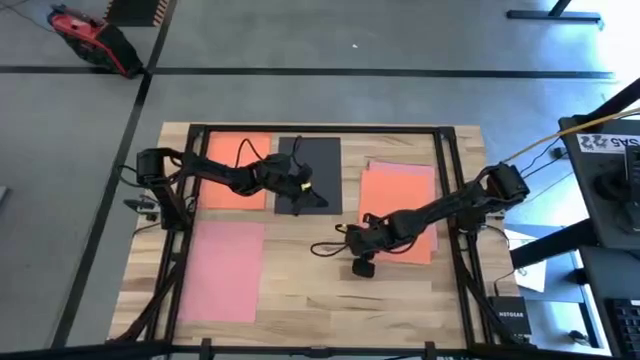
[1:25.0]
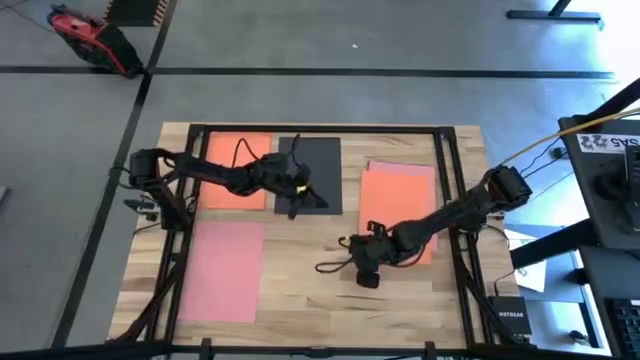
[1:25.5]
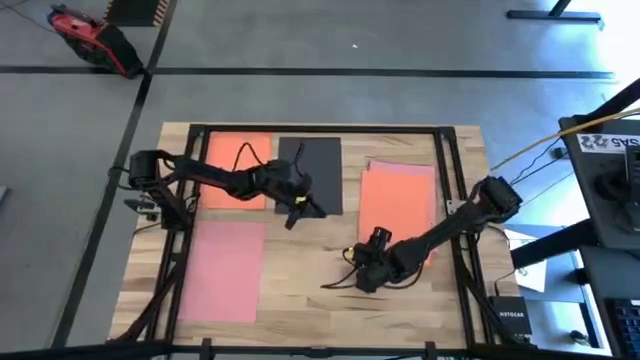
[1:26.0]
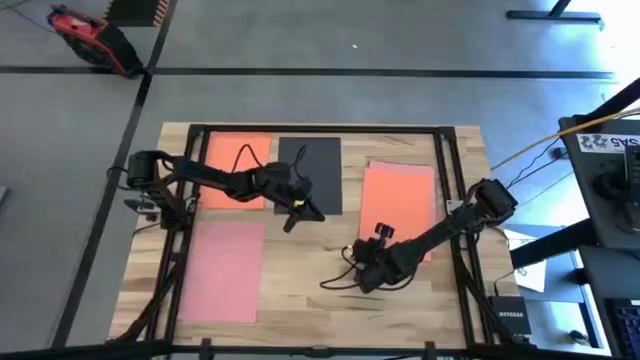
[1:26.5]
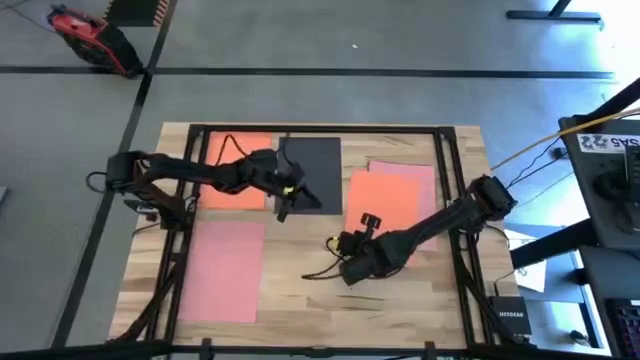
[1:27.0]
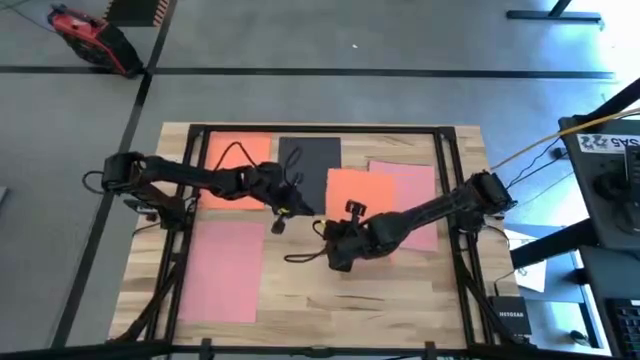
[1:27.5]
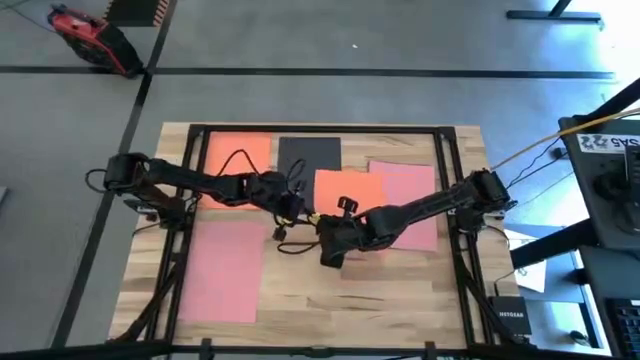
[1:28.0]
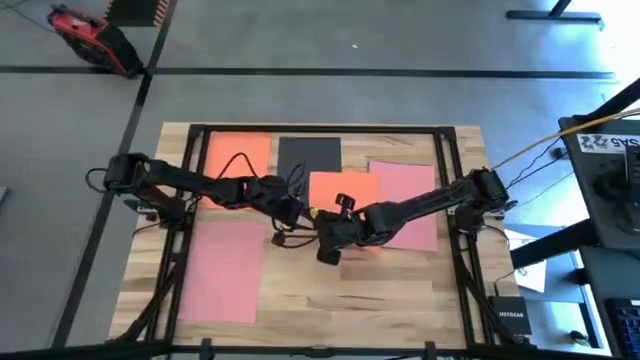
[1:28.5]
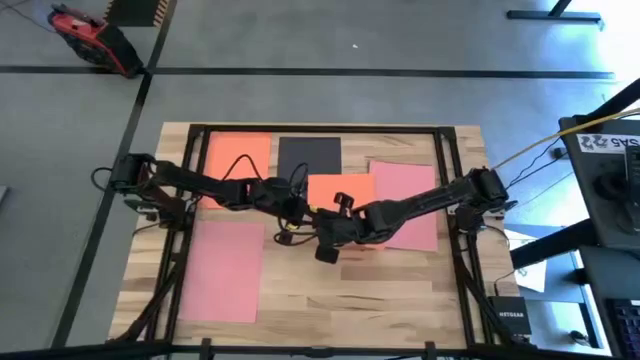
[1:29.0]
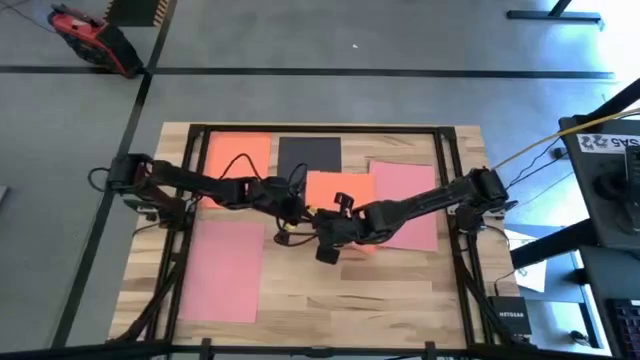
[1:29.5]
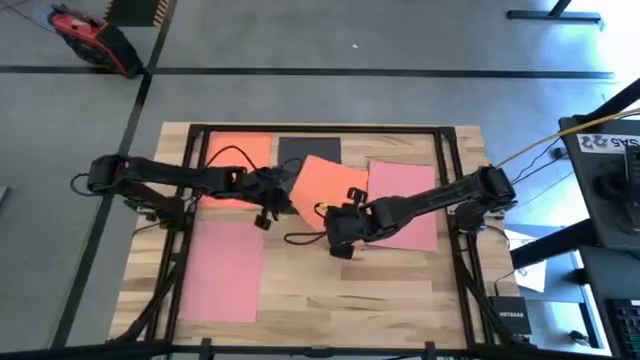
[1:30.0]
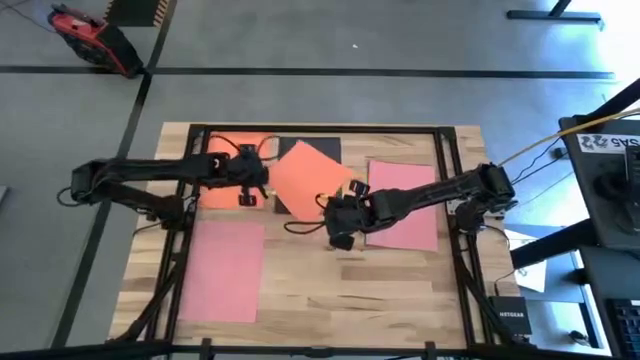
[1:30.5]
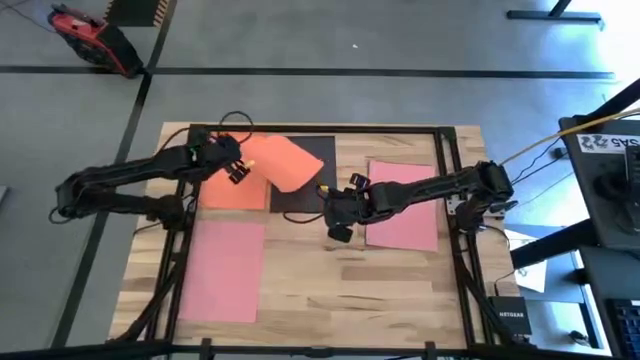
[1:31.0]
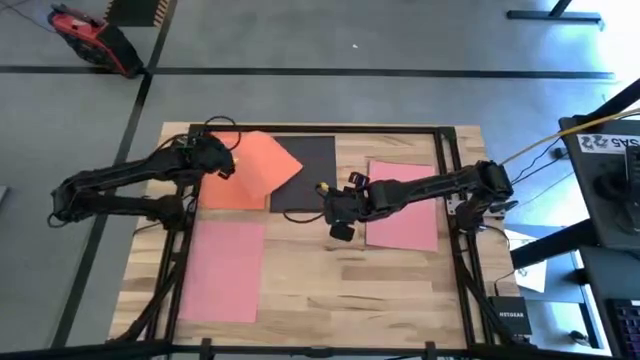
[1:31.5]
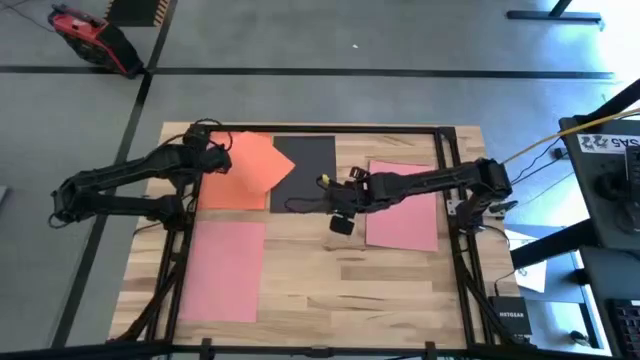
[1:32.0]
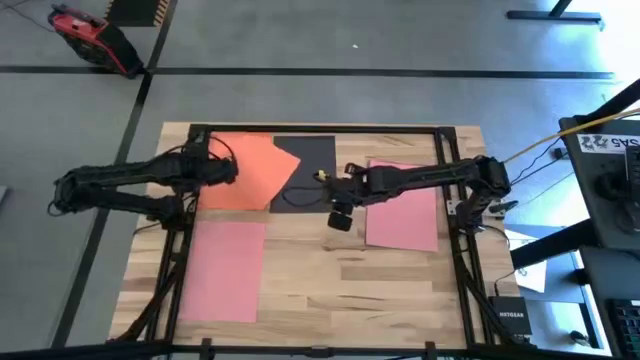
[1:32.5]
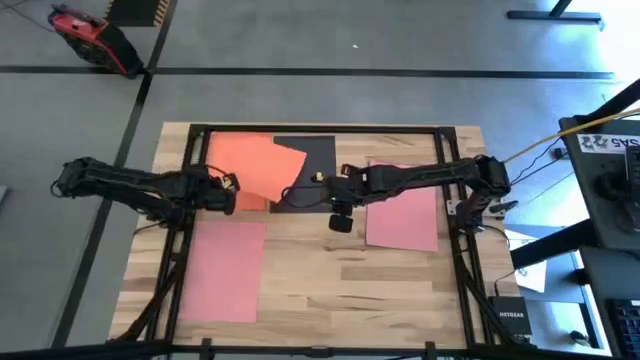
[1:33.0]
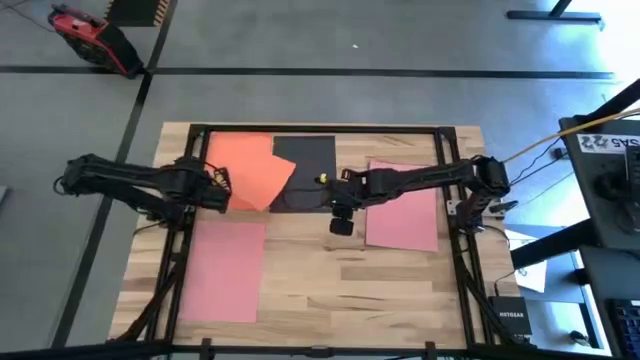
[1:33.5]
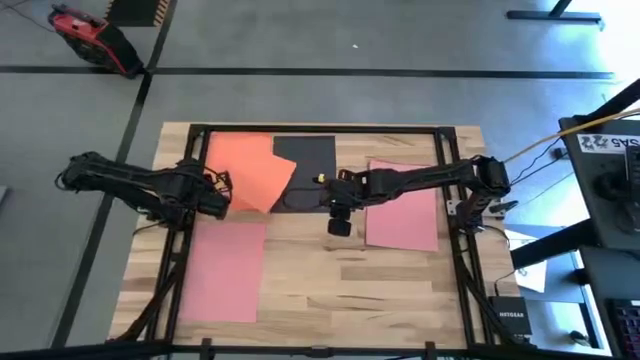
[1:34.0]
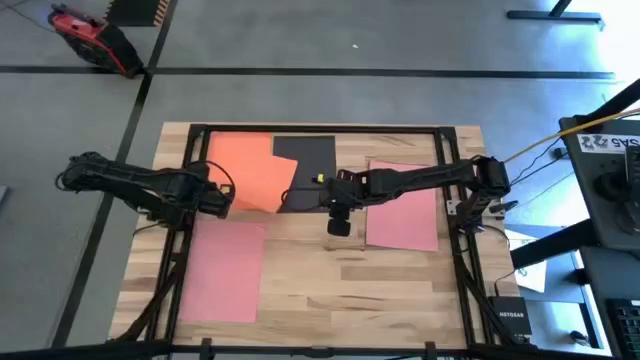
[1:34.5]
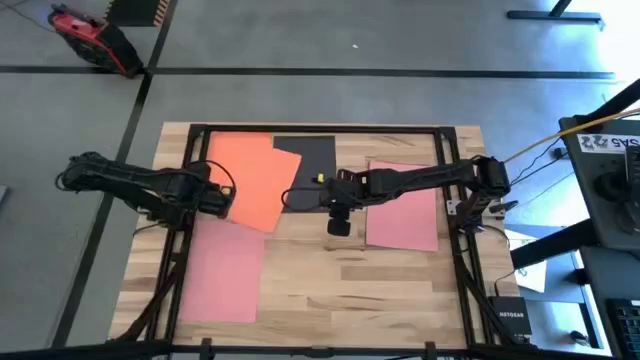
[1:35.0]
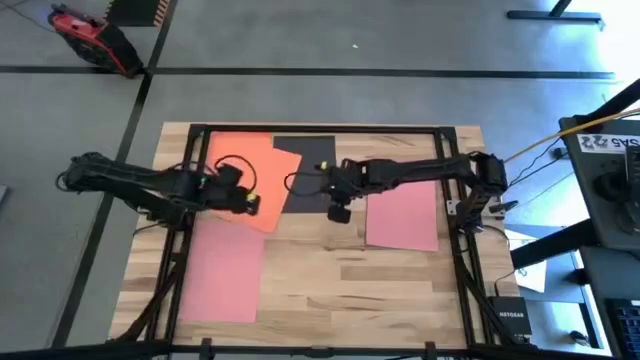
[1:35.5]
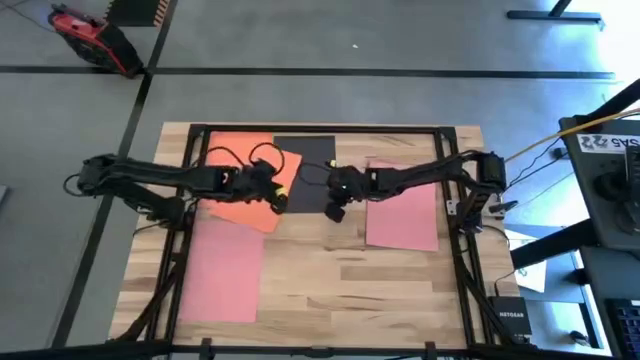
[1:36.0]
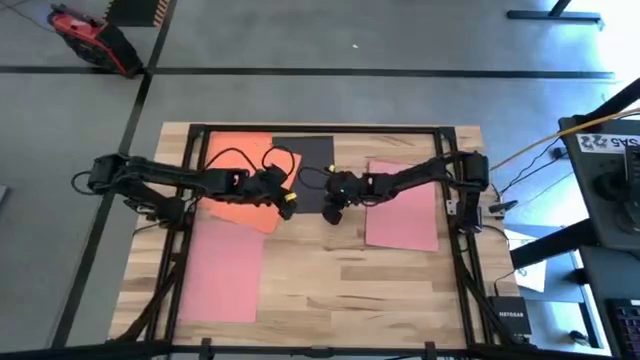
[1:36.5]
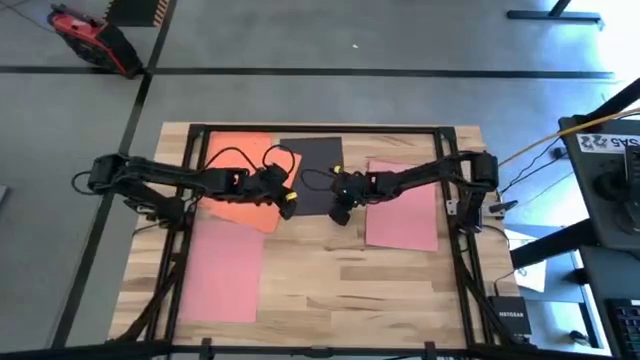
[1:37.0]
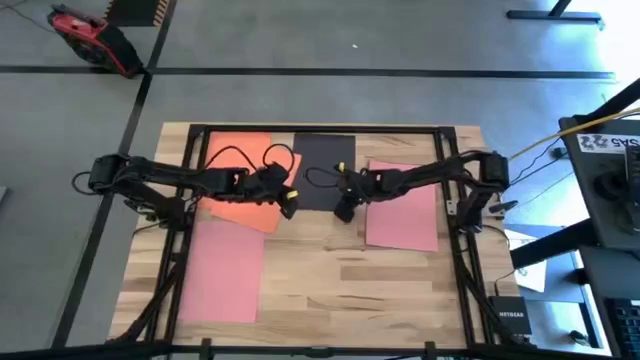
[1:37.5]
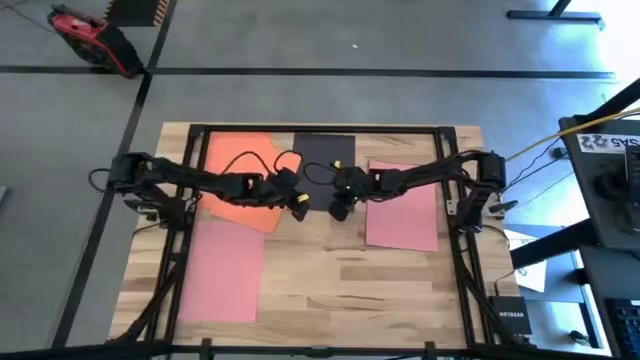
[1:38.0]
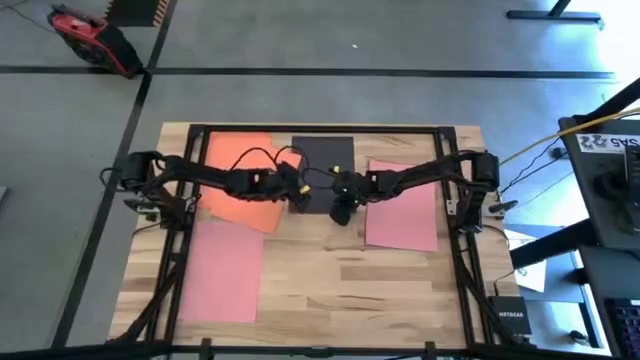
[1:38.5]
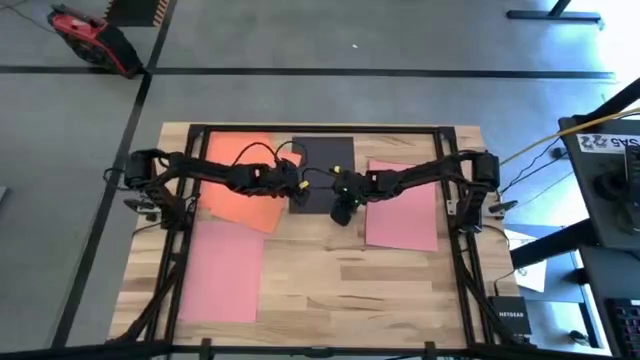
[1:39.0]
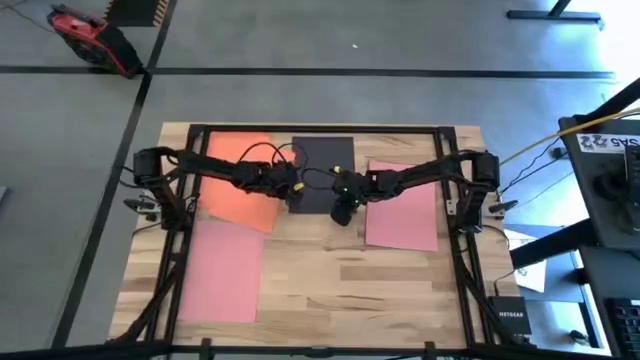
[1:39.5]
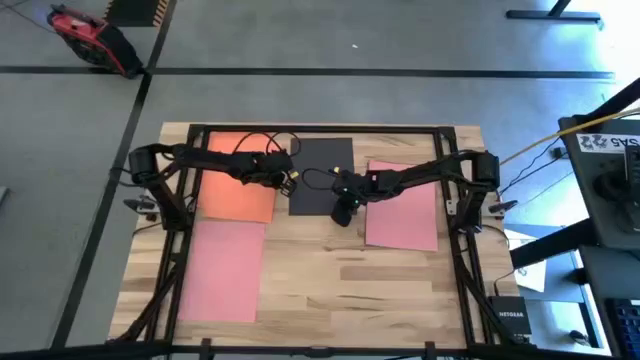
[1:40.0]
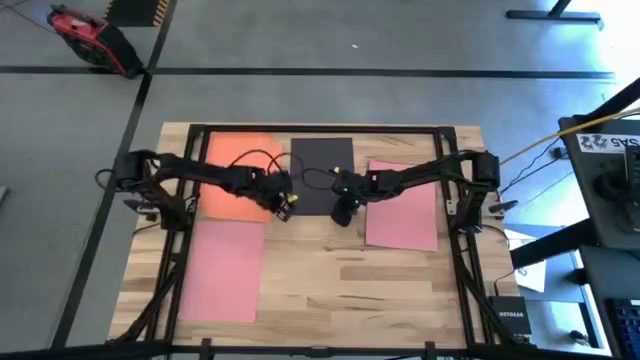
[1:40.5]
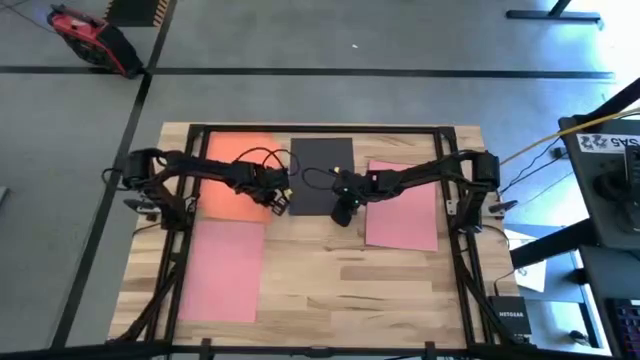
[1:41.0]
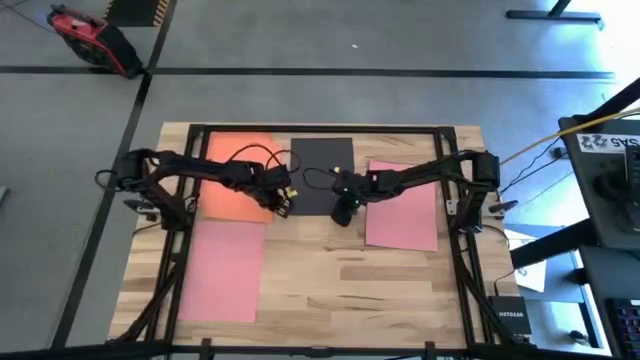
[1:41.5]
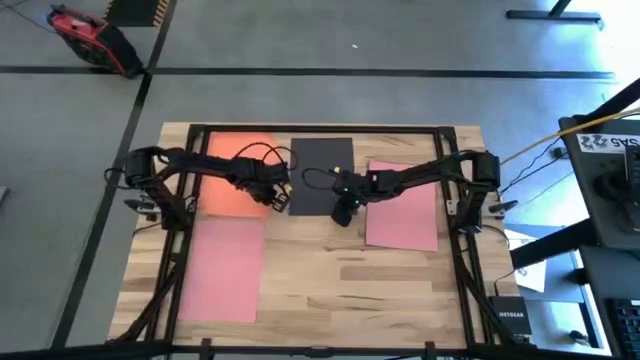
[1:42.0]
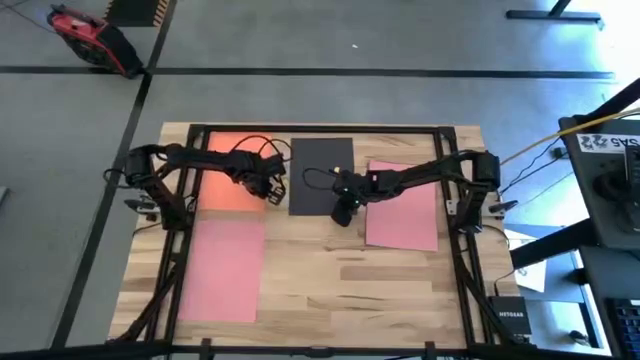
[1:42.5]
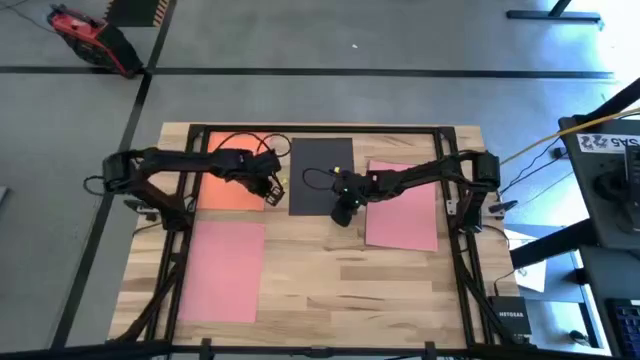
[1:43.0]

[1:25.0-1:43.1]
Task: Organize paper
Stack the orange color paper on top of the other orange color paper
